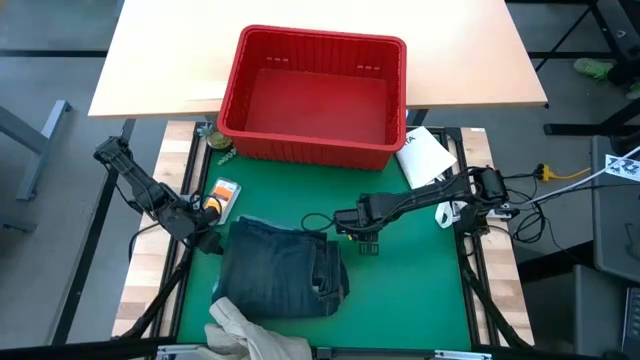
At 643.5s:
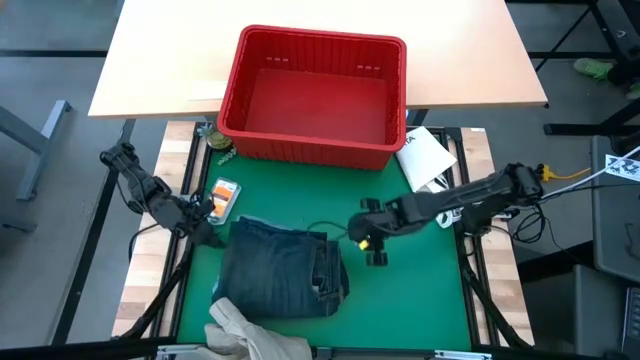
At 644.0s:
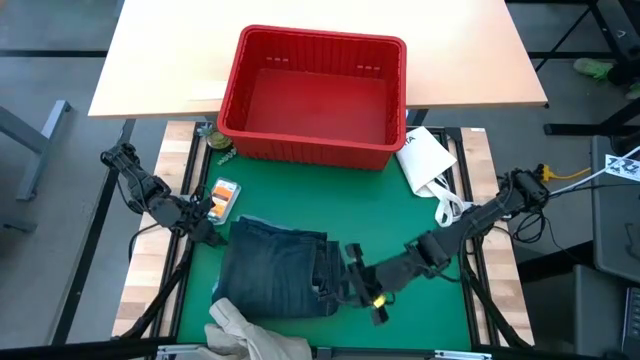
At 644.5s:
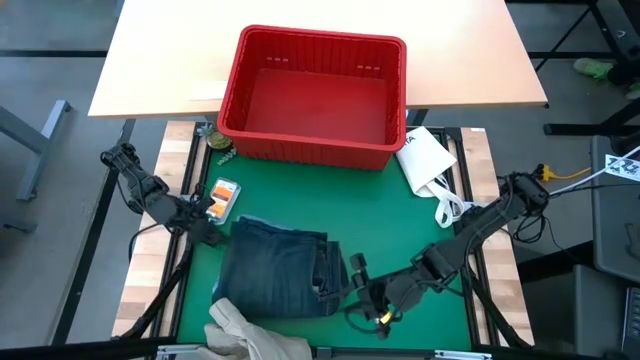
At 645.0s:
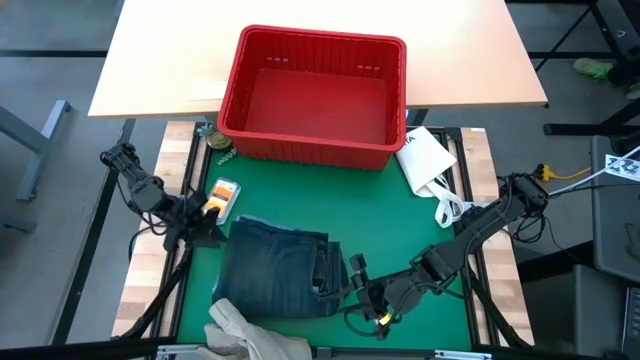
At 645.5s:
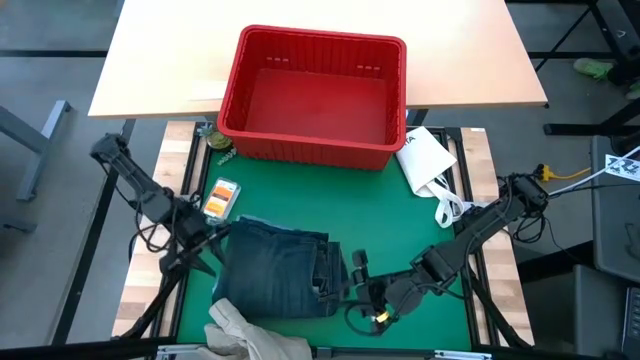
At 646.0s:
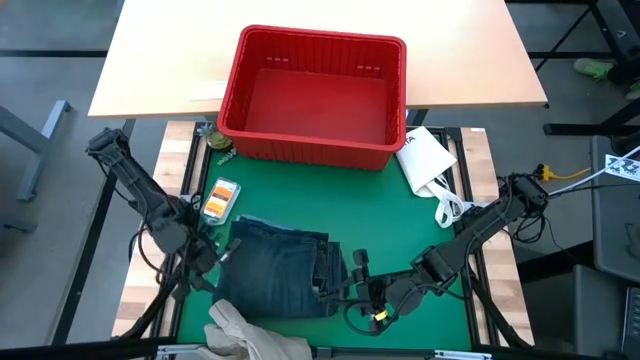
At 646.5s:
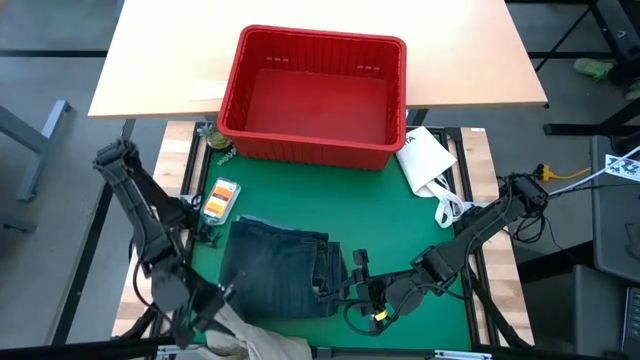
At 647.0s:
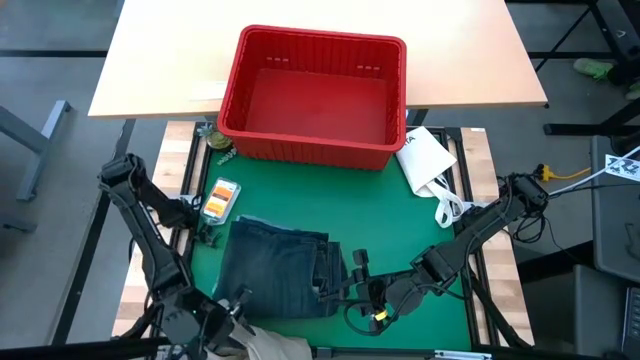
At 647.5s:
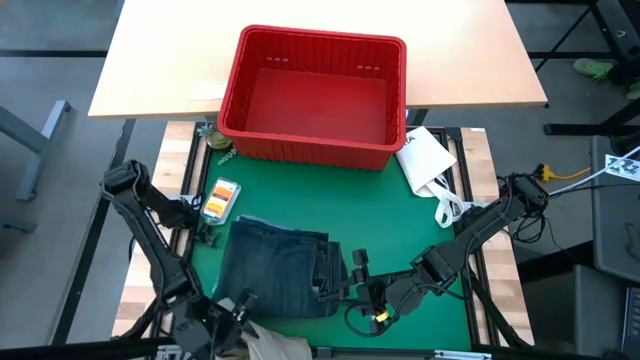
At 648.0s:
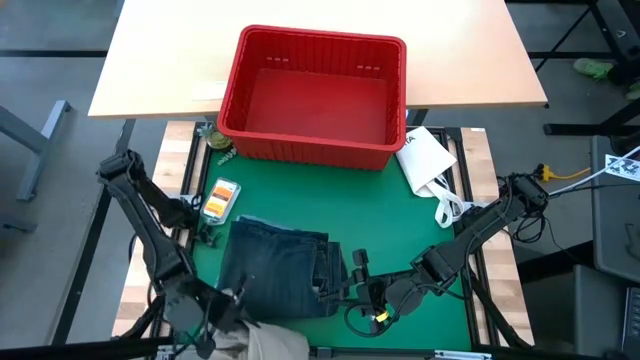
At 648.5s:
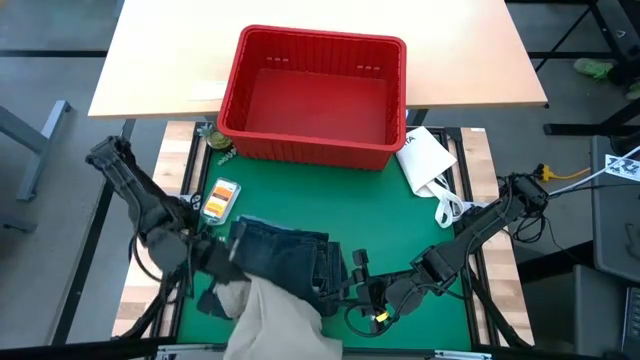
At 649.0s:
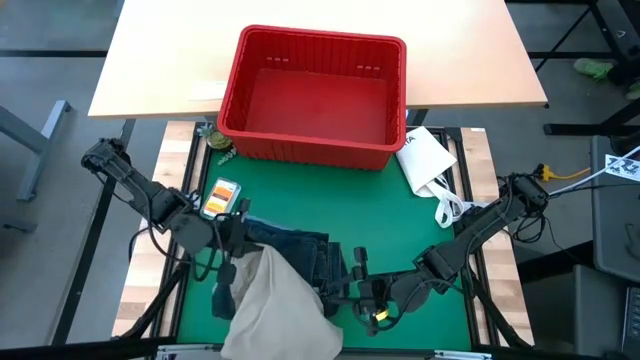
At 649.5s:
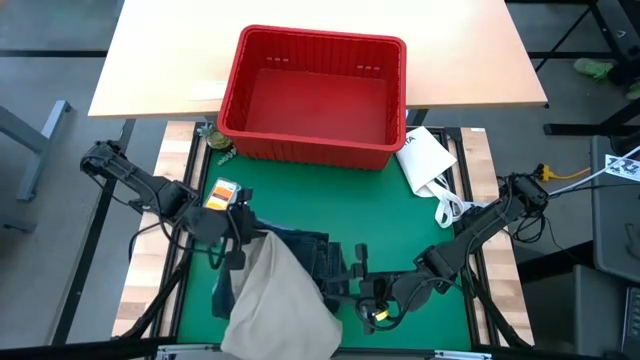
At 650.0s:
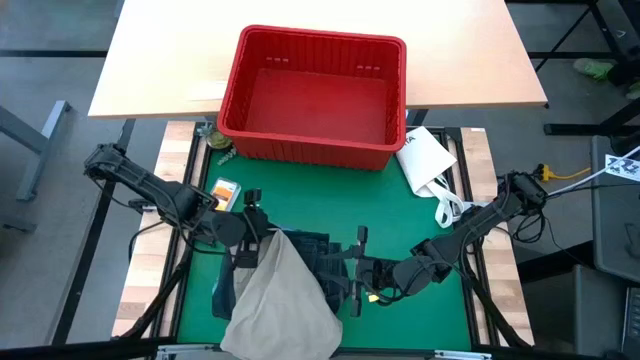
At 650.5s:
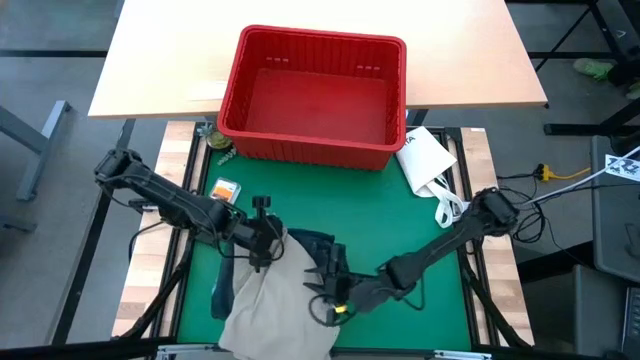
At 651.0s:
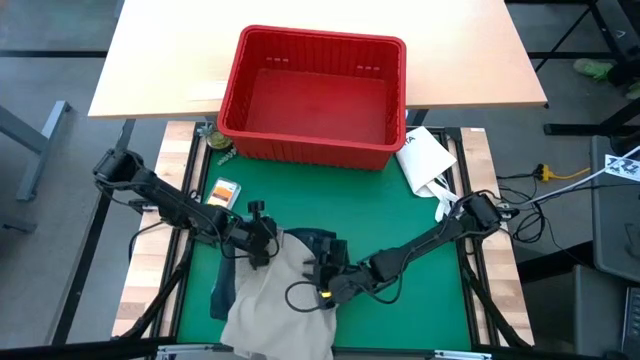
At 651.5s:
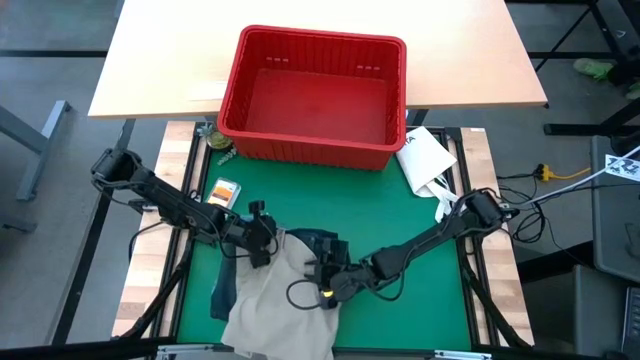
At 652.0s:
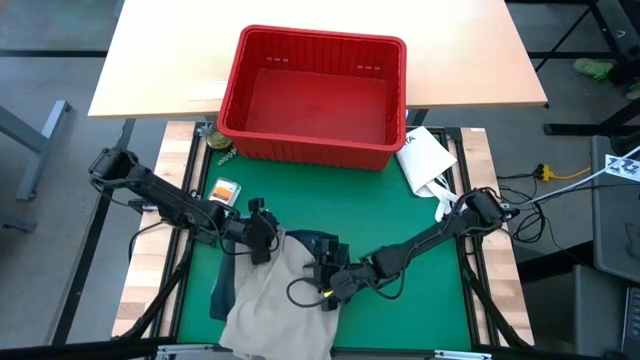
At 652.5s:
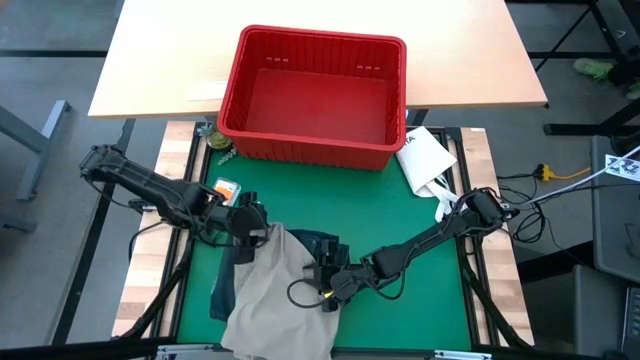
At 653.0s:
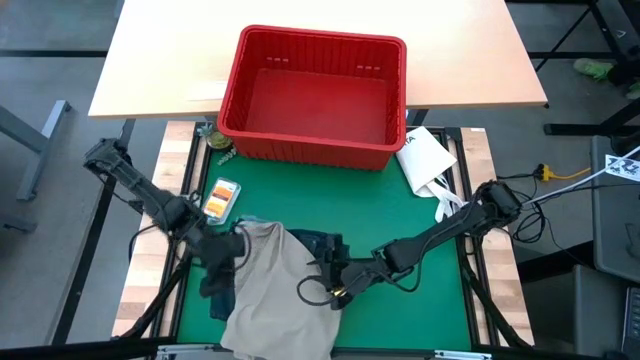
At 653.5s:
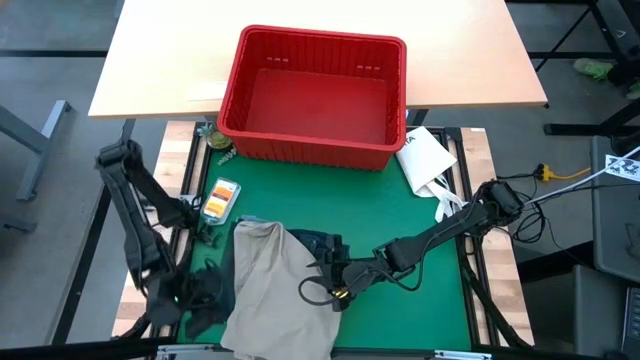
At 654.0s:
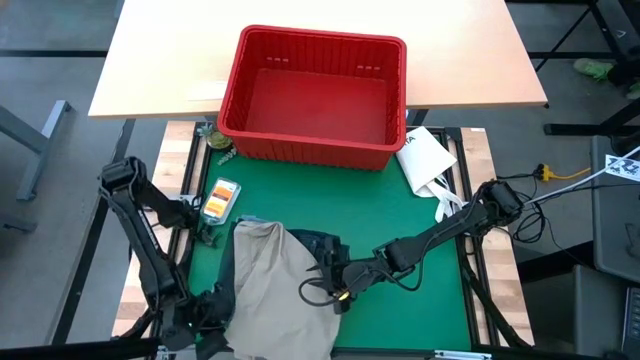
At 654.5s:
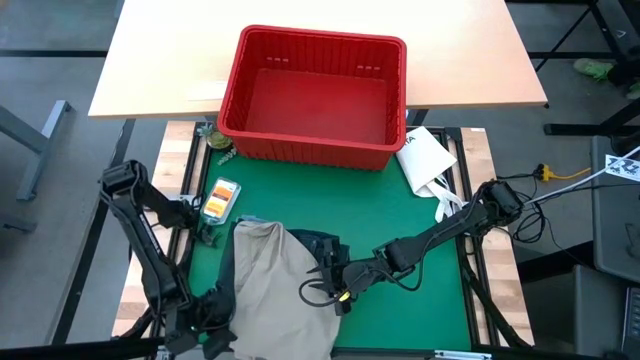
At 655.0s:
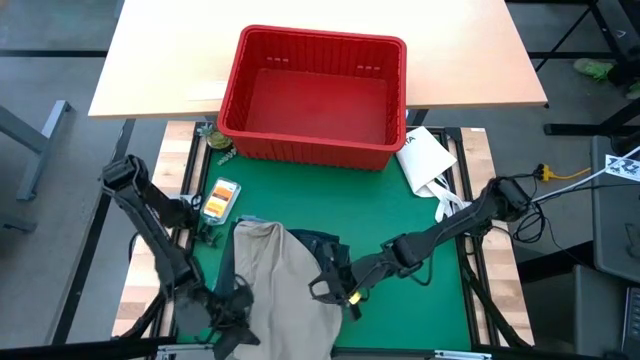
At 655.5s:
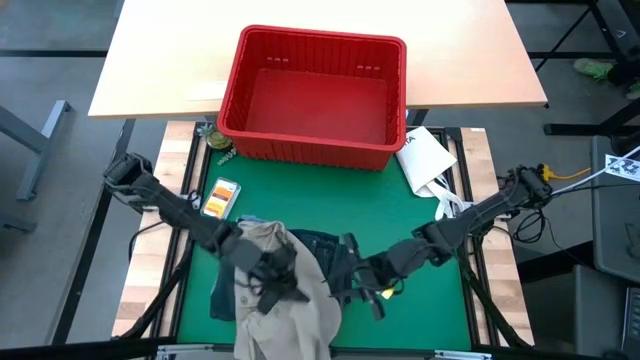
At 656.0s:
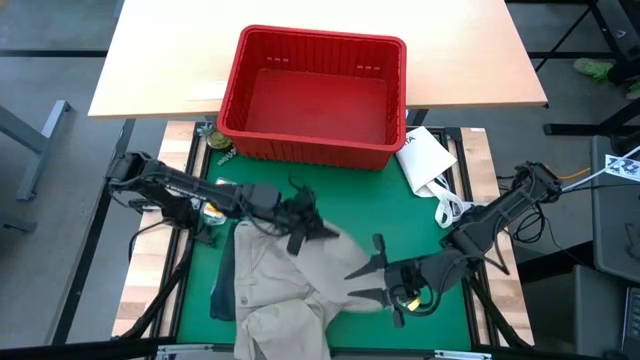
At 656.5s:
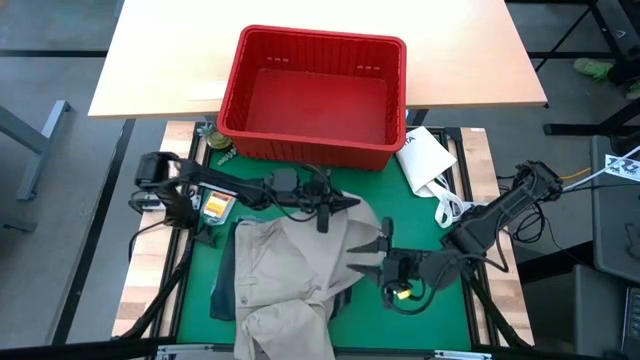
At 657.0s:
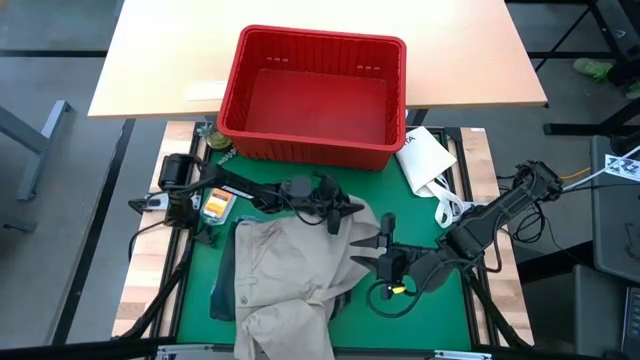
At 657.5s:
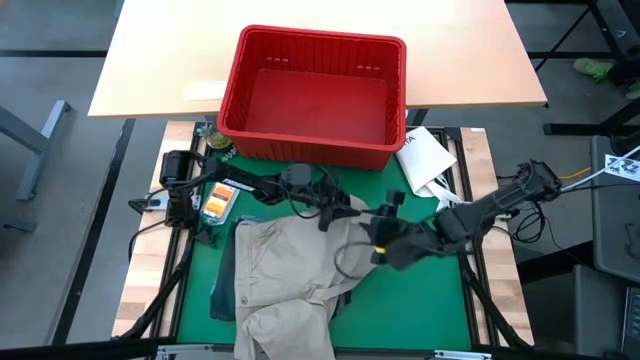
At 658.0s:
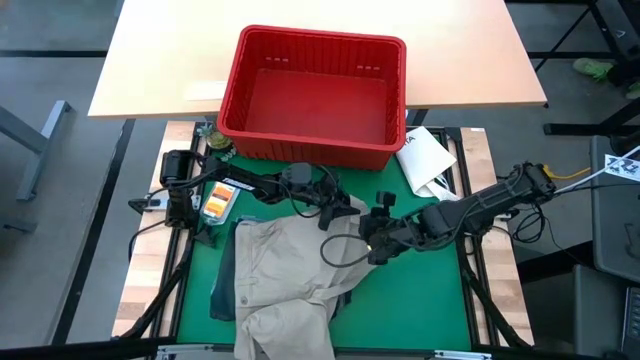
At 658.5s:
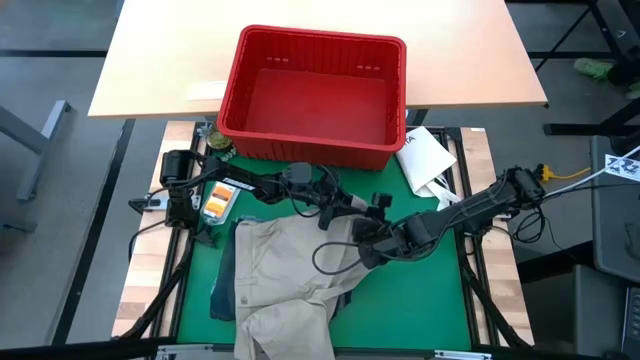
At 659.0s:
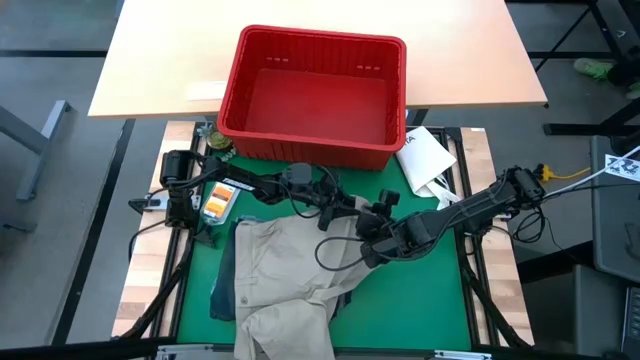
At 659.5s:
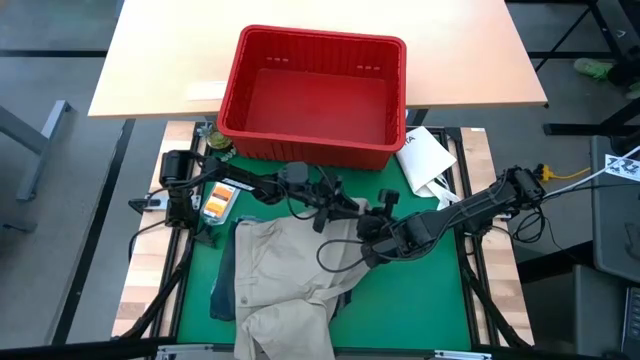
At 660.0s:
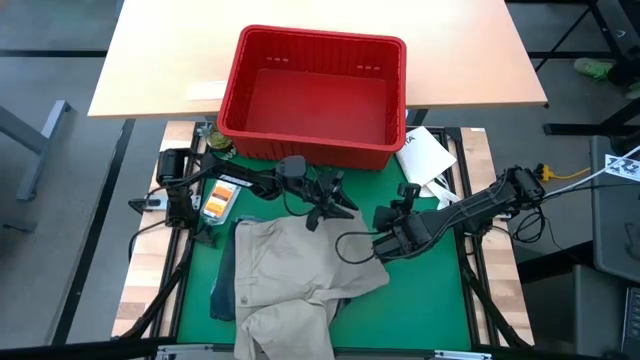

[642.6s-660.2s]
Task: Fold Laundry from Bin
Fold the gray short

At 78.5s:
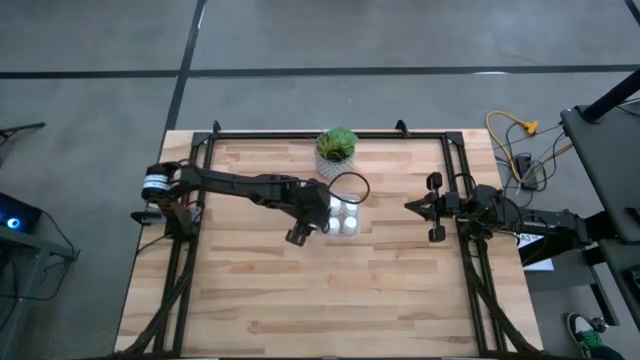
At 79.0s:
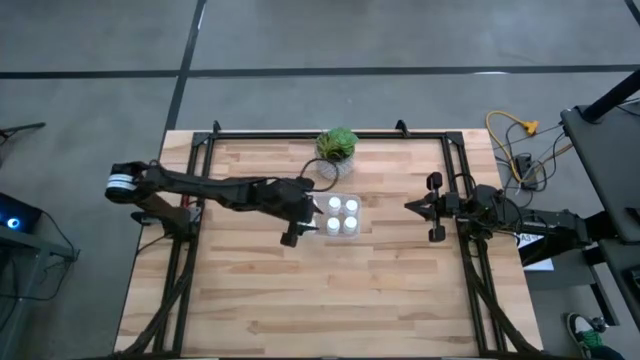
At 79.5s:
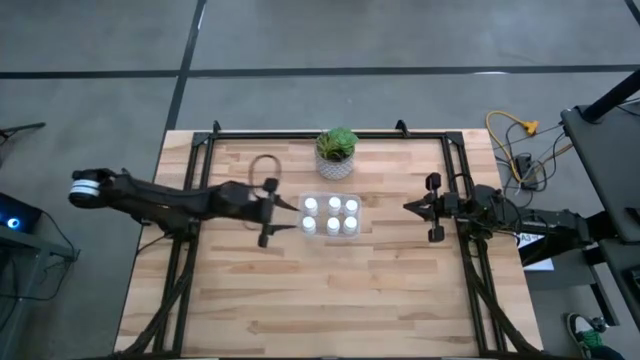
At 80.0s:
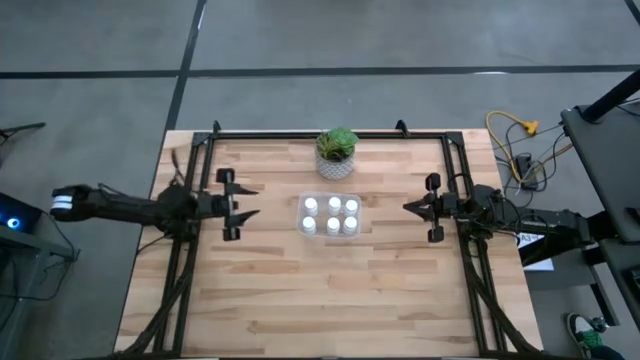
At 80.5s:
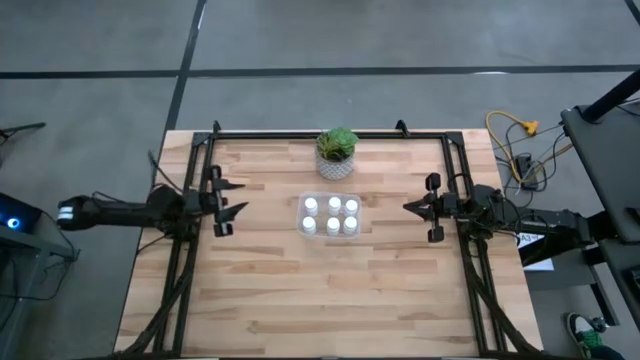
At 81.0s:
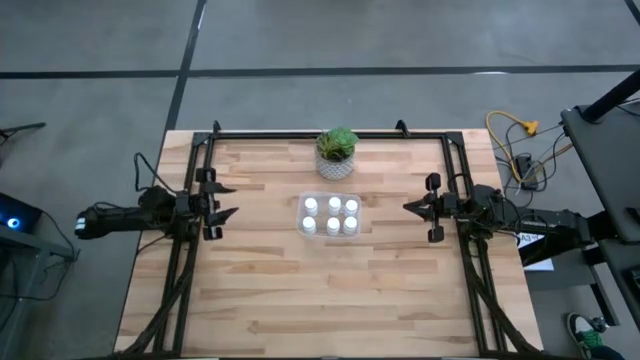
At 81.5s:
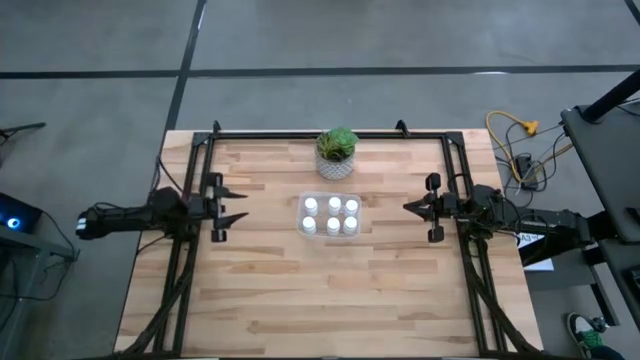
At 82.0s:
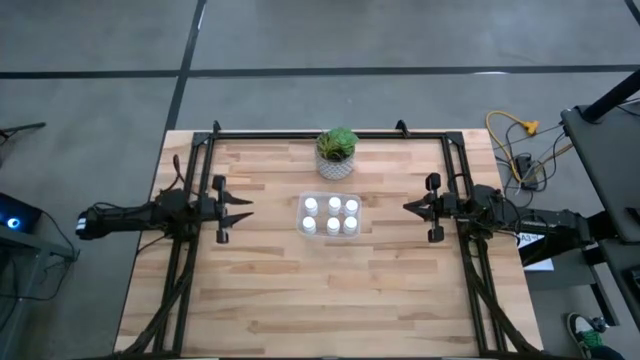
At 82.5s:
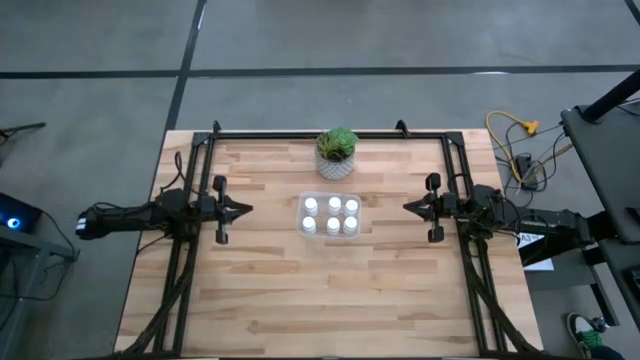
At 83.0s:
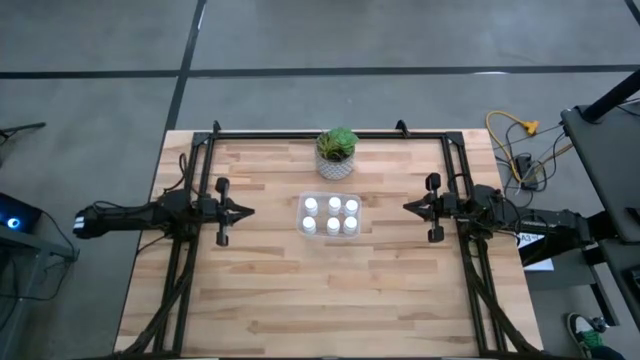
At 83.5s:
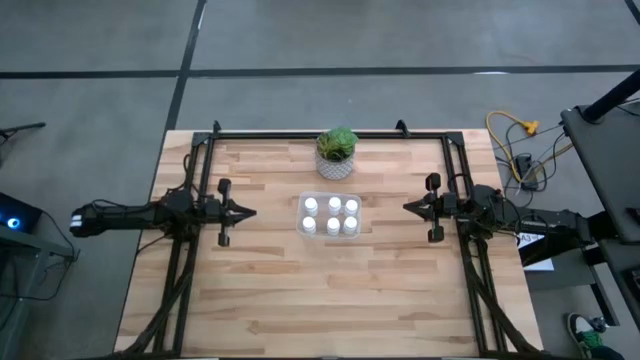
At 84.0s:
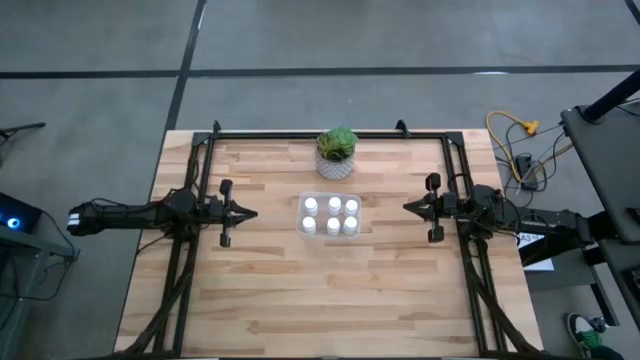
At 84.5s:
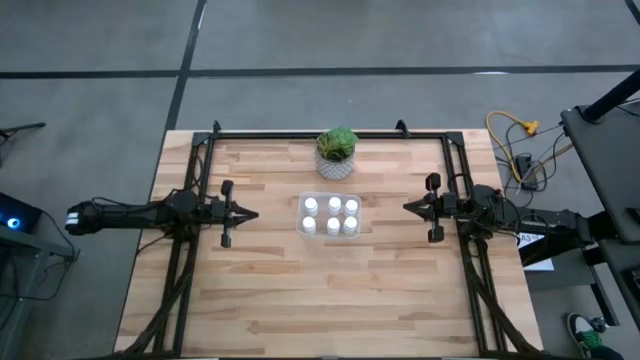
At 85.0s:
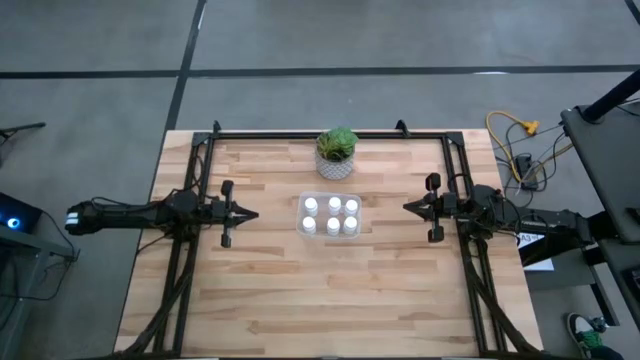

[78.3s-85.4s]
Task: Pick and place pill bottles into a basket
Return to Home Position
